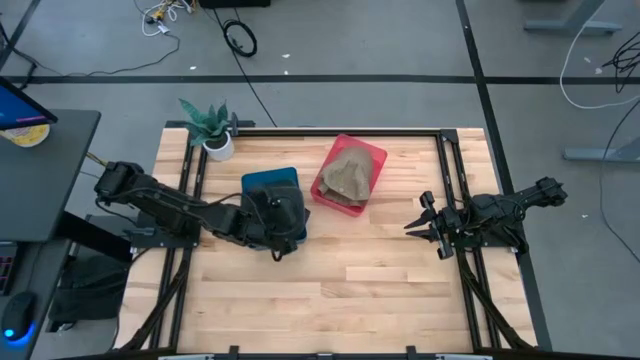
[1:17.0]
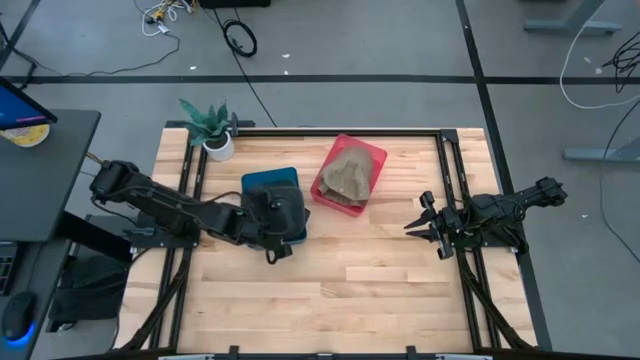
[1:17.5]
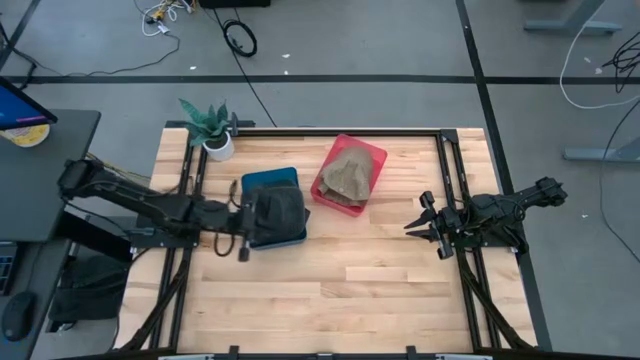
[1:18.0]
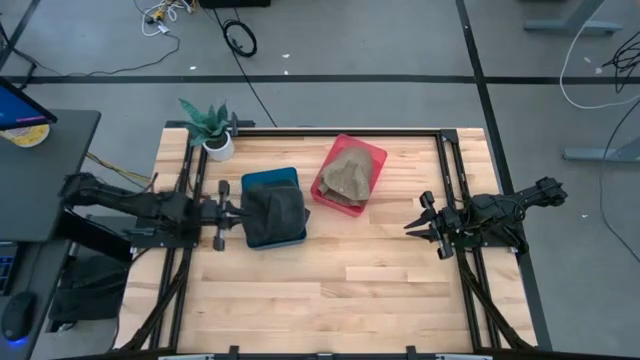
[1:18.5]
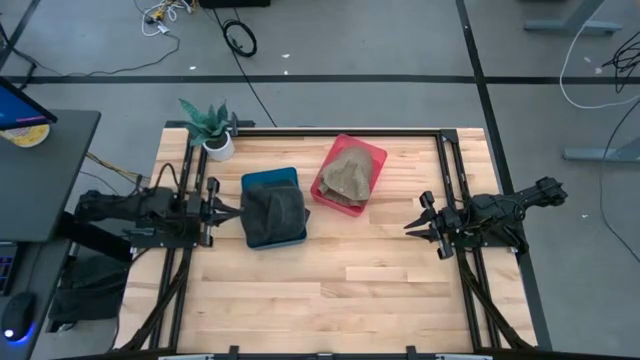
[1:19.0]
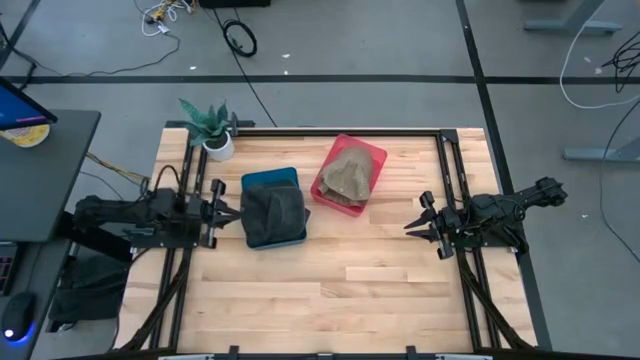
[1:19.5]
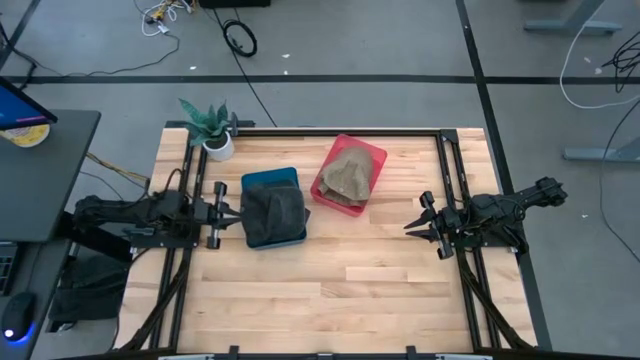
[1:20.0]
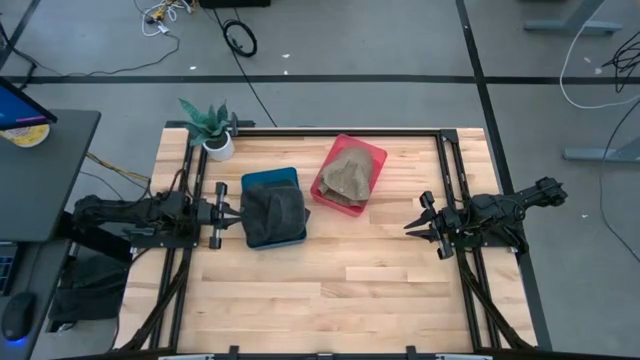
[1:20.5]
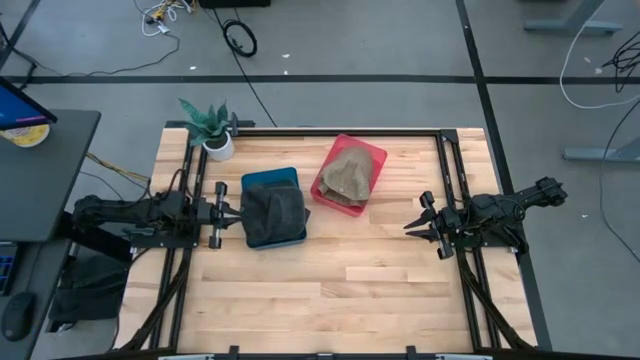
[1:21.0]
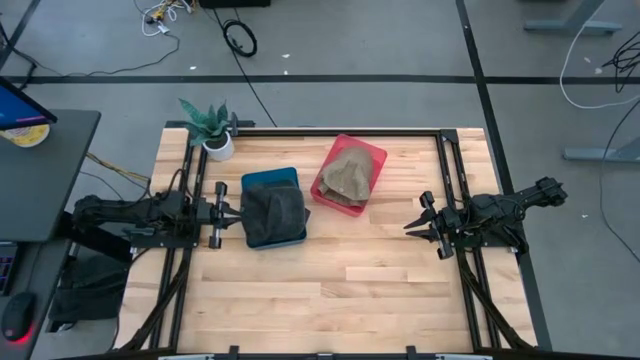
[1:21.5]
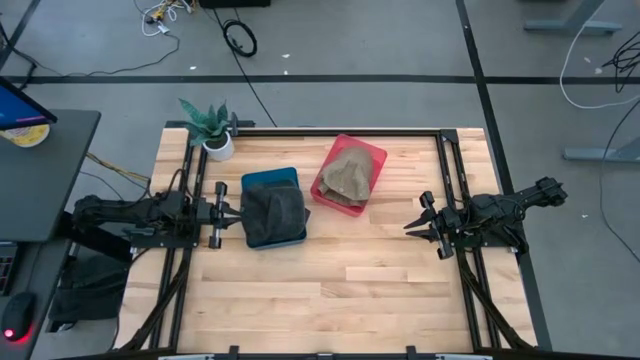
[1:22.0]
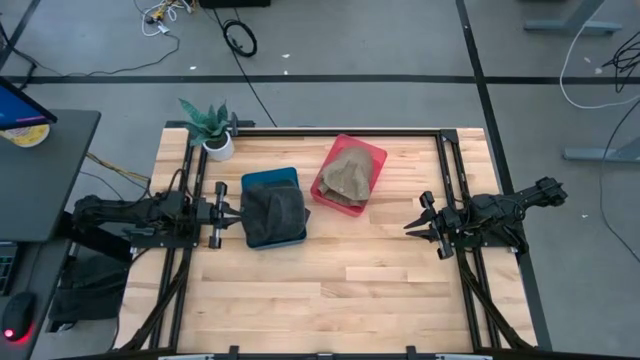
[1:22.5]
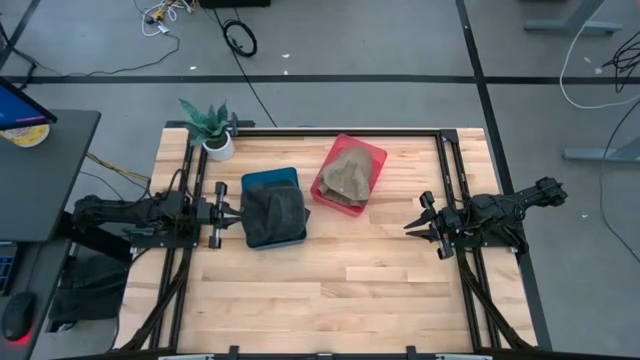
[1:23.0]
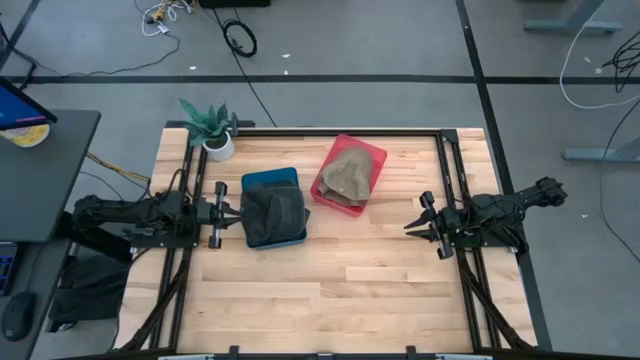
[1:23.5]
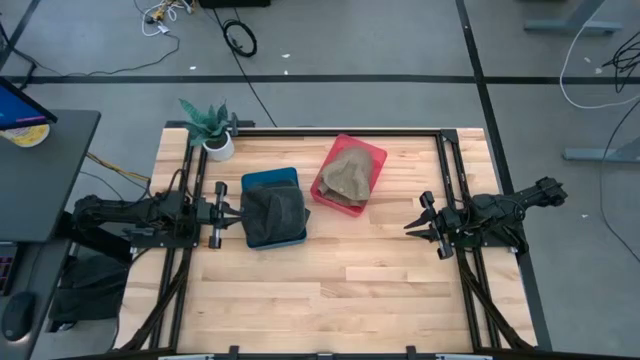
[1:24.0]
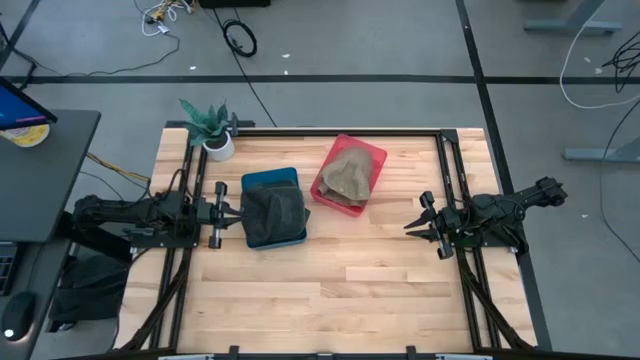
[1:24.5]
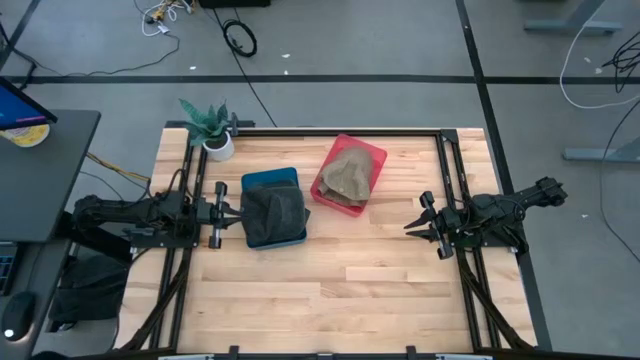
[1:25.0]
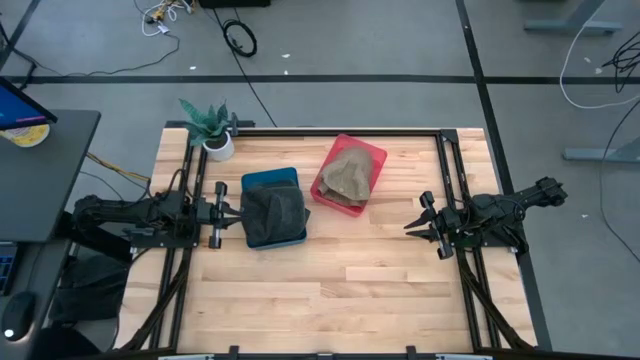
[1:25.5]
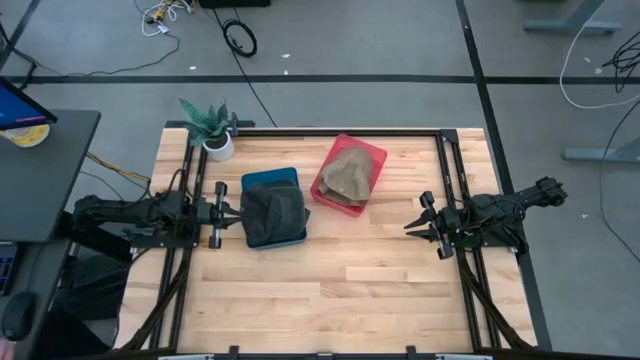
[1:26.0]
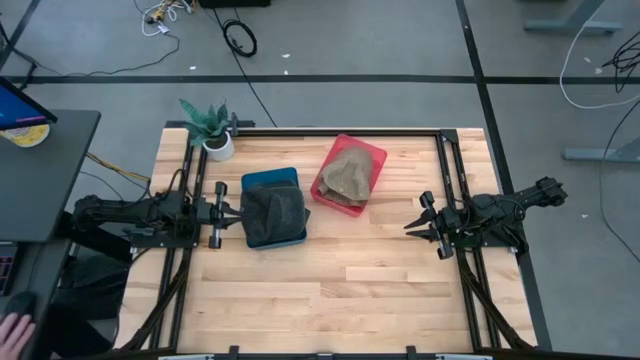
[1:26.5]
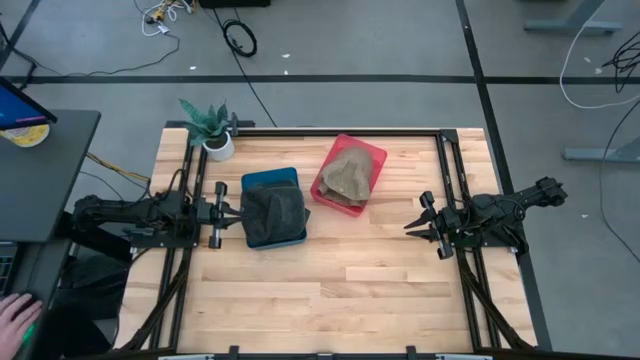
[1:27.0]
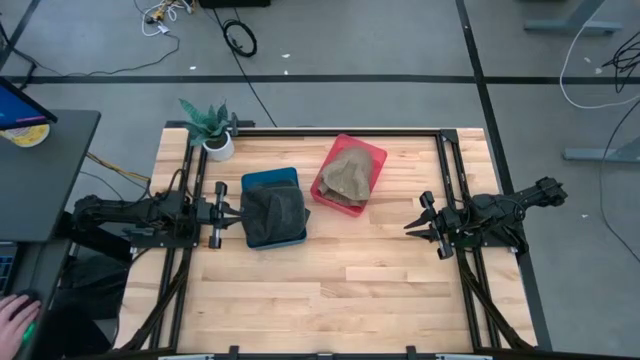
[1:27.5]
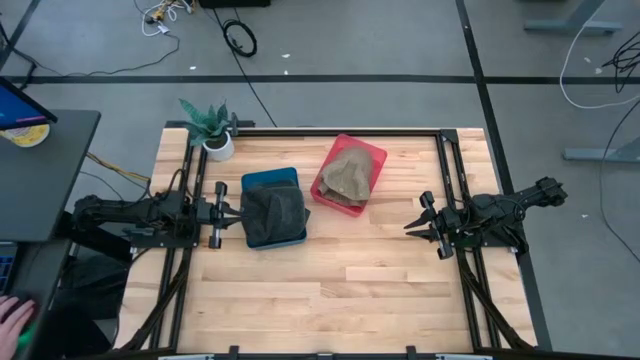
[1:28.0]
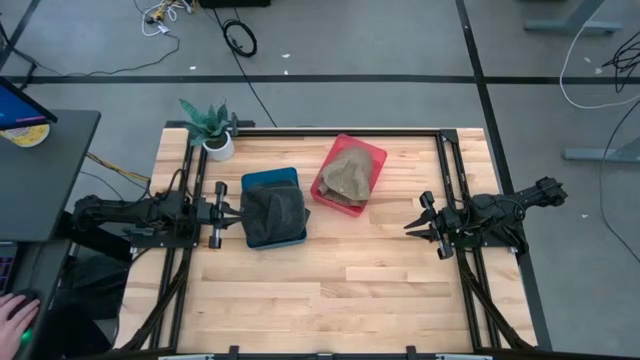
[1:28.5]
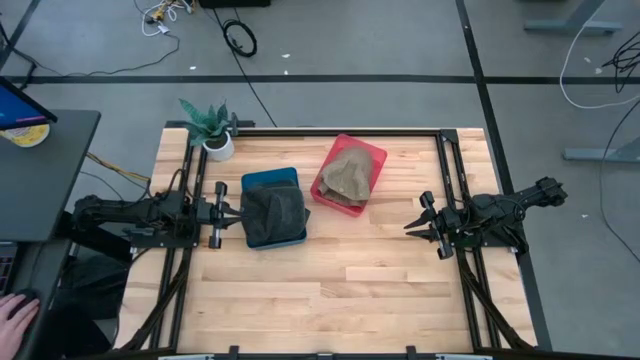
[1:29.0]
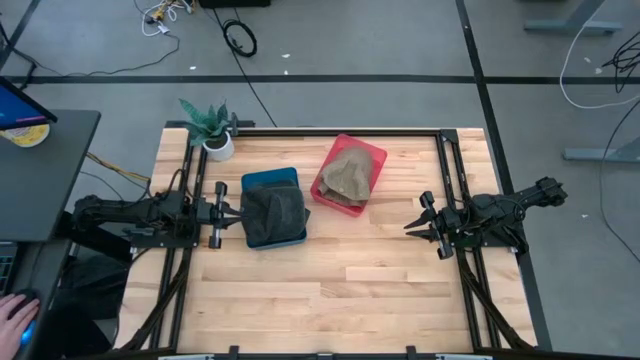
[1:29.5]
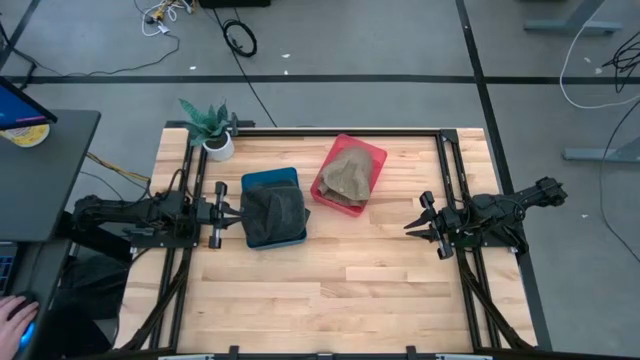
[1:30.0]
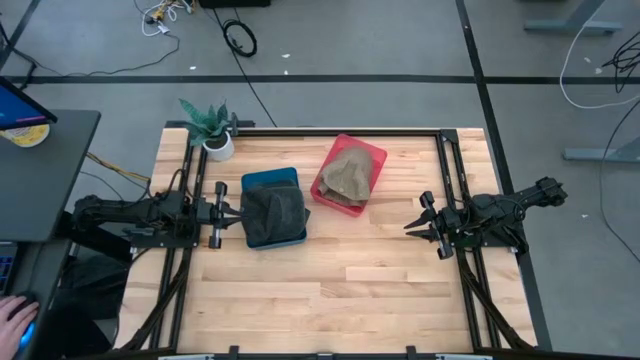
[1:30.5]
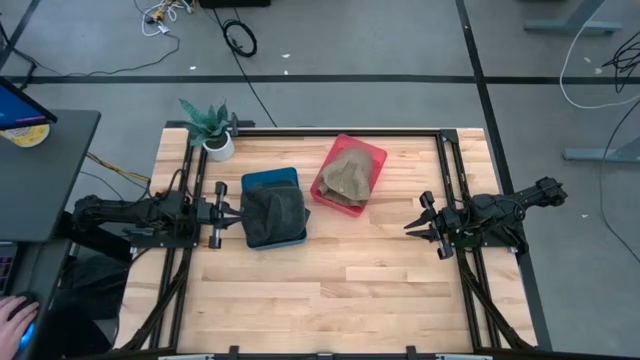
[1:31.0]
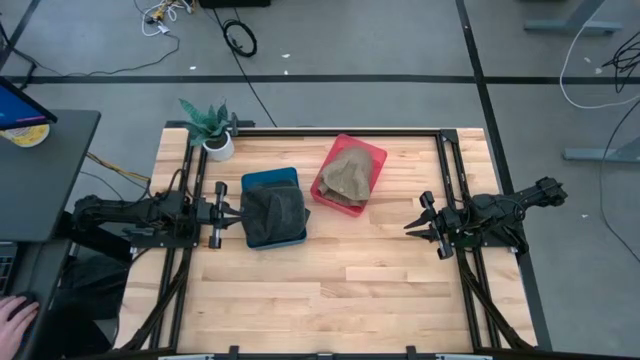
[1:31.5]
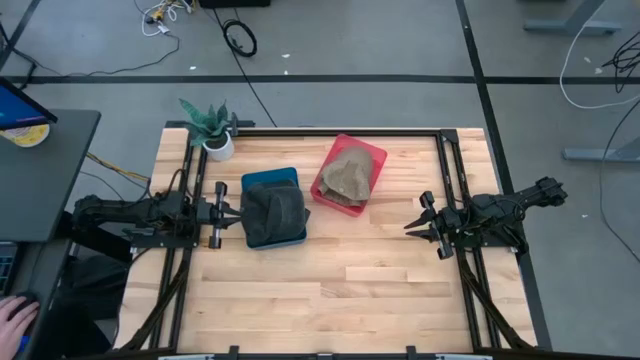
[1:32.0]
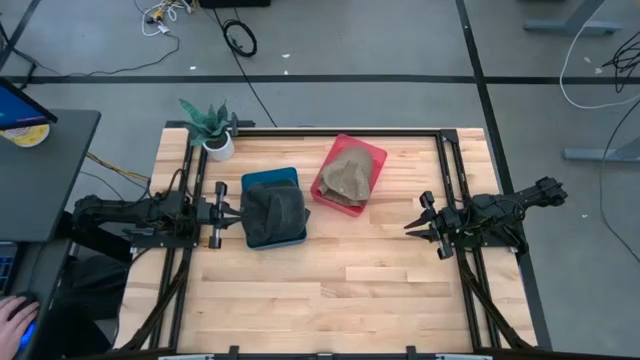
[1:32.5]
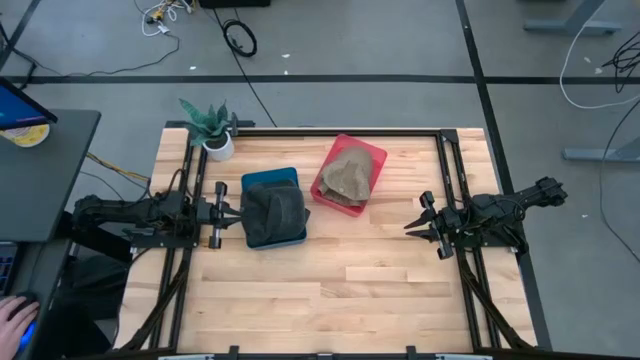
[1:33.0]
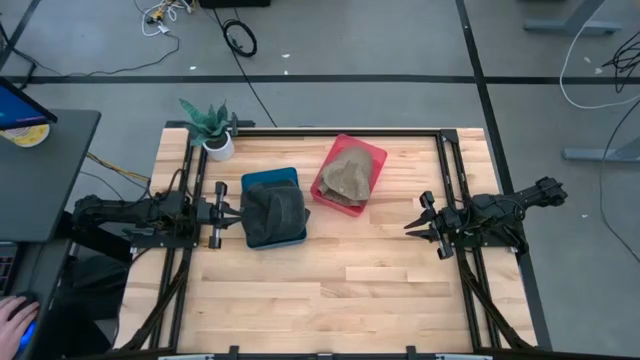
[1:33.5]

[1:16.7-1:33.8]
Task: Pick & Place hat
Return to Home Position
